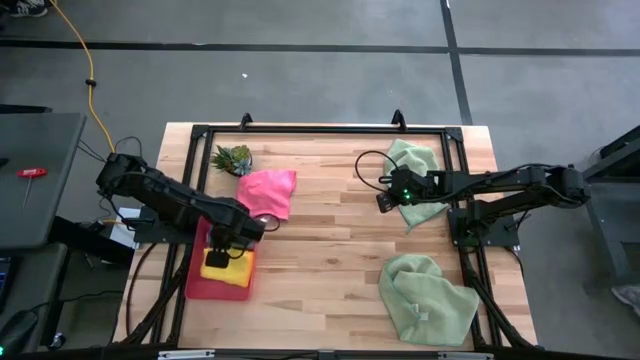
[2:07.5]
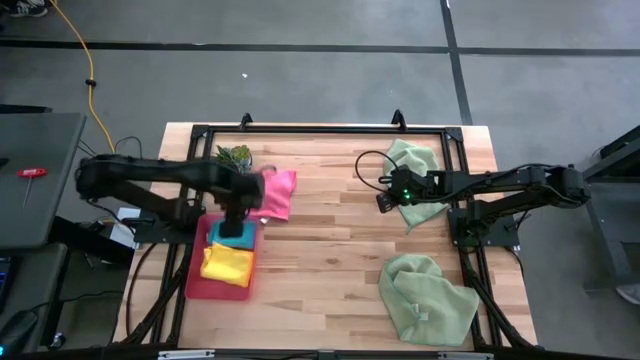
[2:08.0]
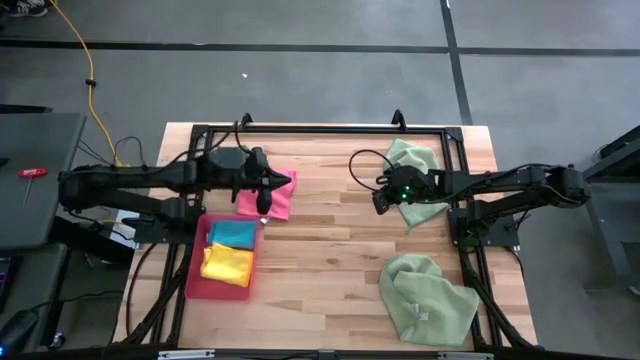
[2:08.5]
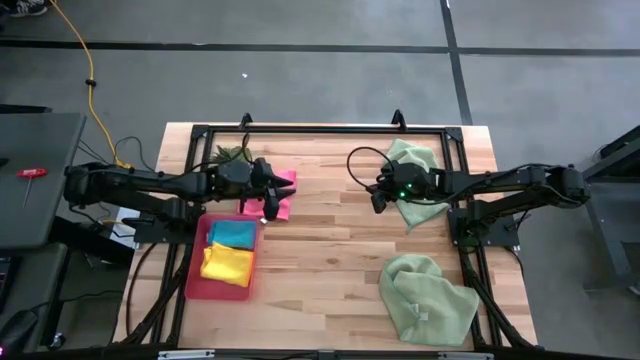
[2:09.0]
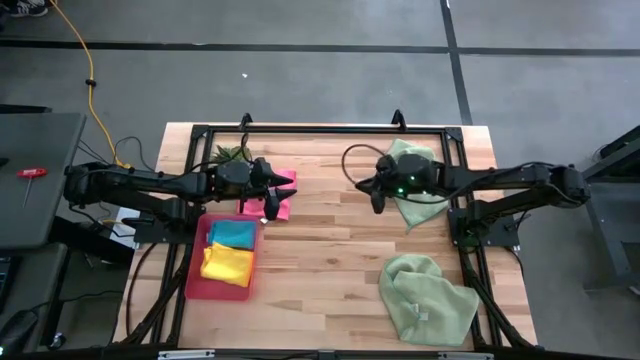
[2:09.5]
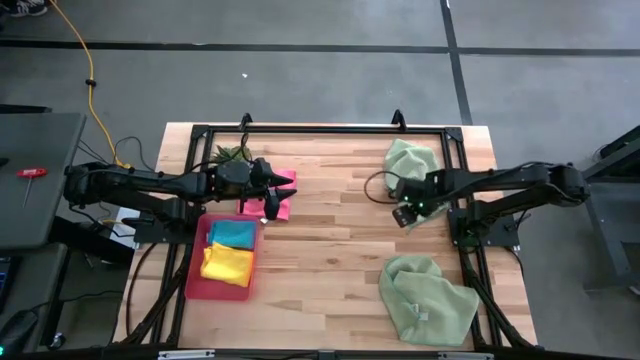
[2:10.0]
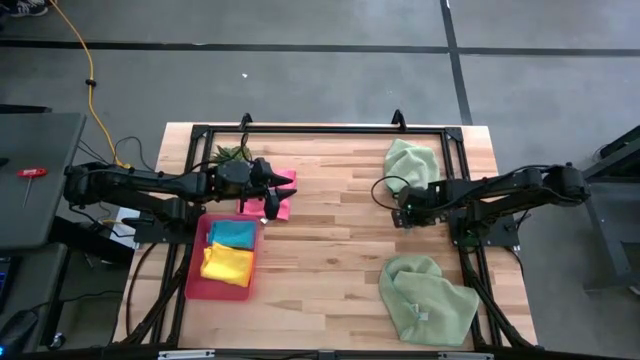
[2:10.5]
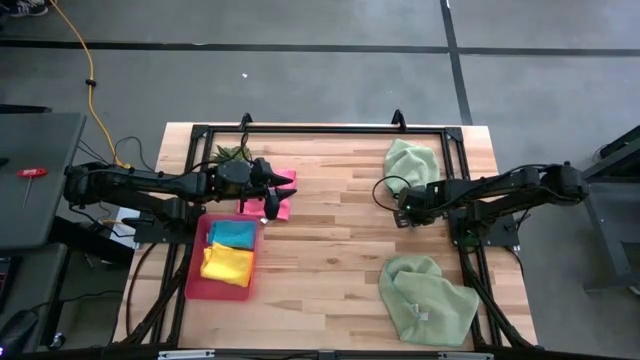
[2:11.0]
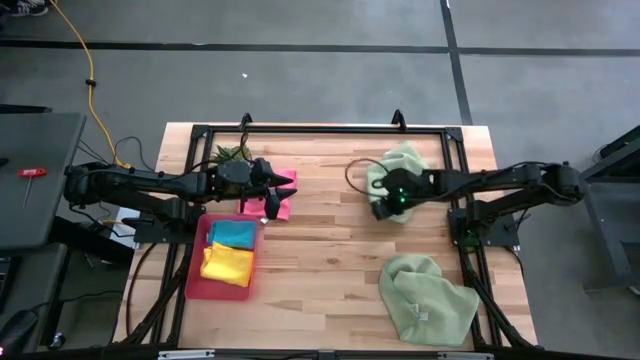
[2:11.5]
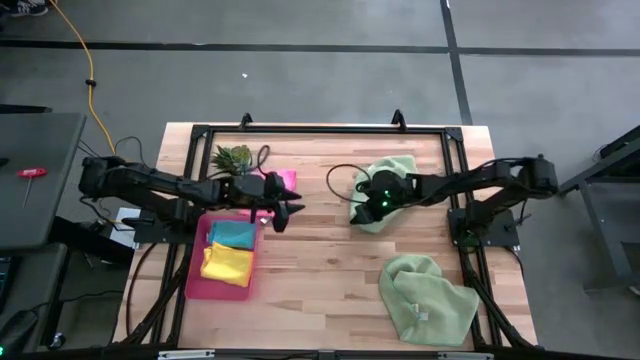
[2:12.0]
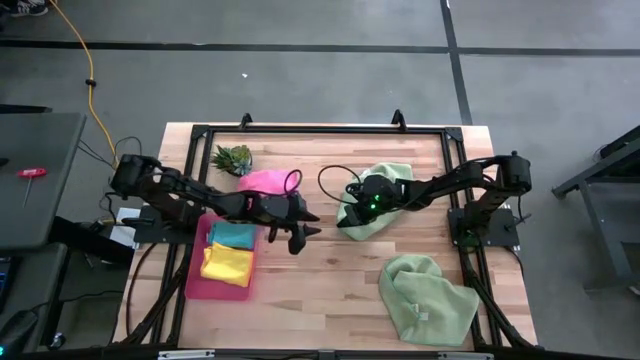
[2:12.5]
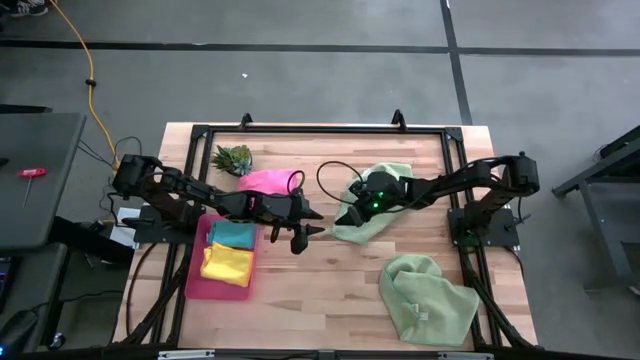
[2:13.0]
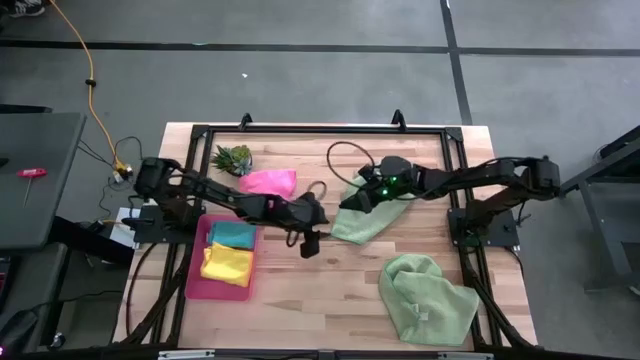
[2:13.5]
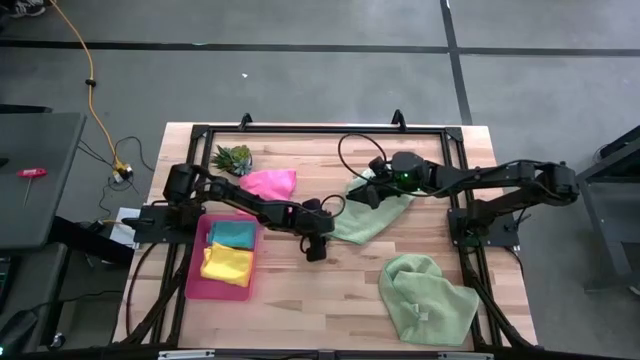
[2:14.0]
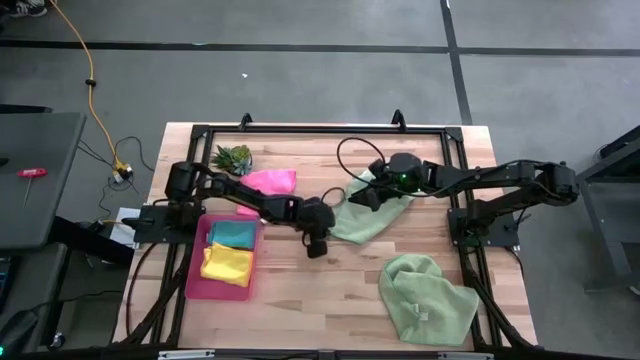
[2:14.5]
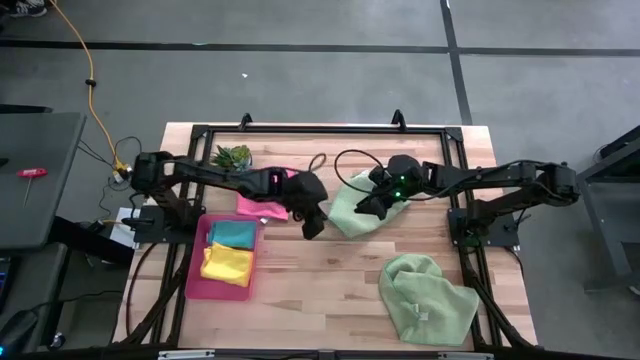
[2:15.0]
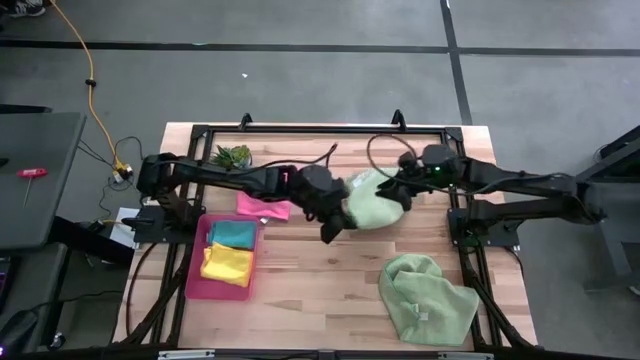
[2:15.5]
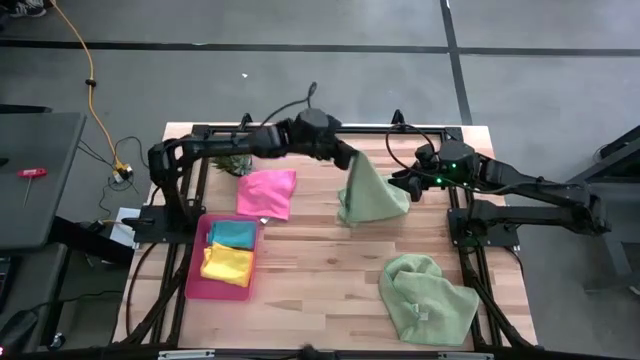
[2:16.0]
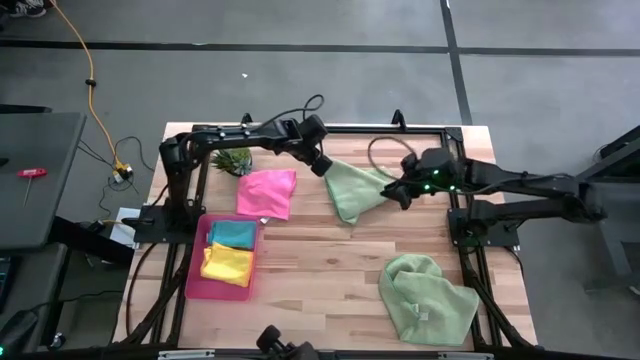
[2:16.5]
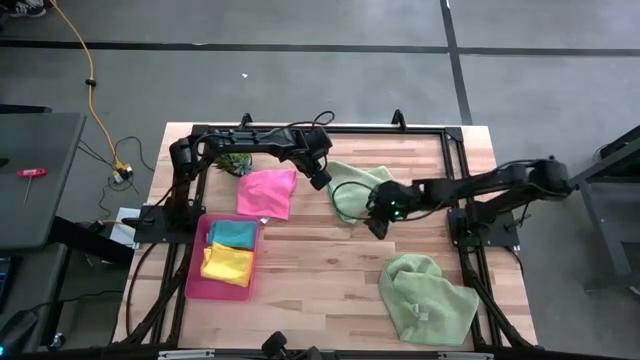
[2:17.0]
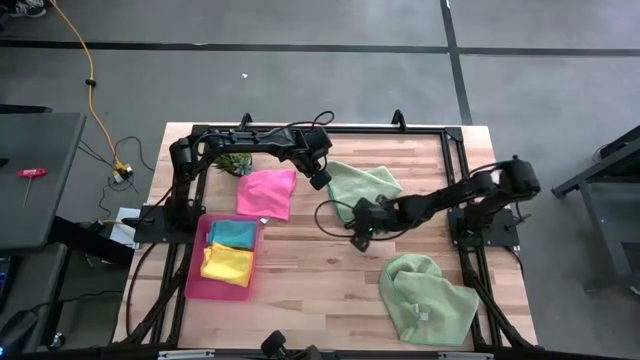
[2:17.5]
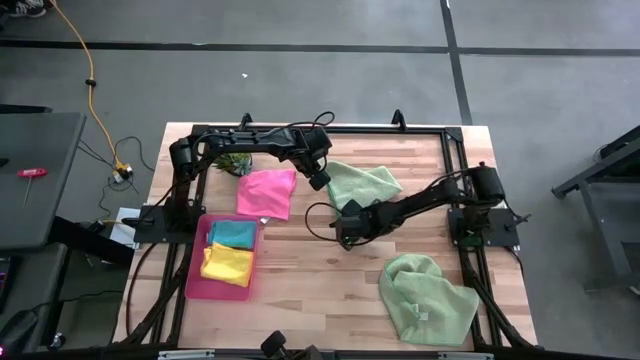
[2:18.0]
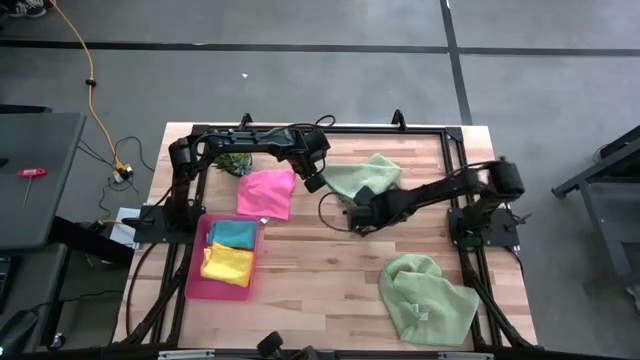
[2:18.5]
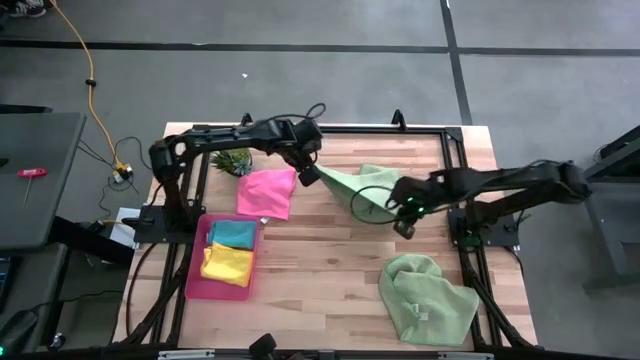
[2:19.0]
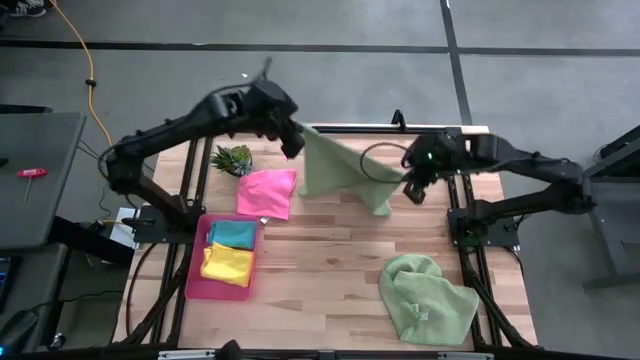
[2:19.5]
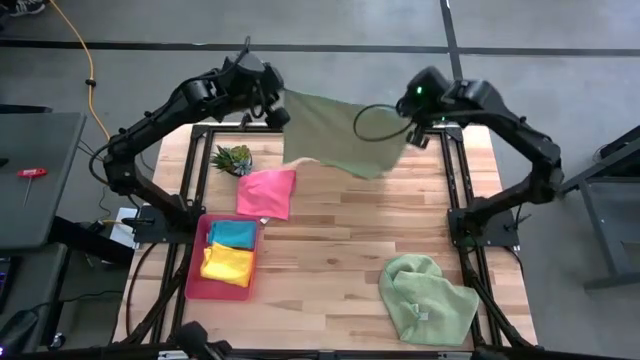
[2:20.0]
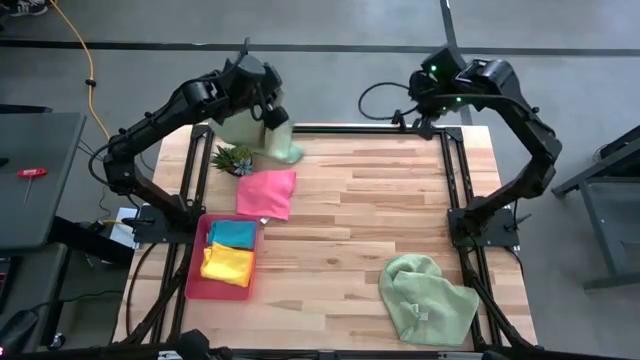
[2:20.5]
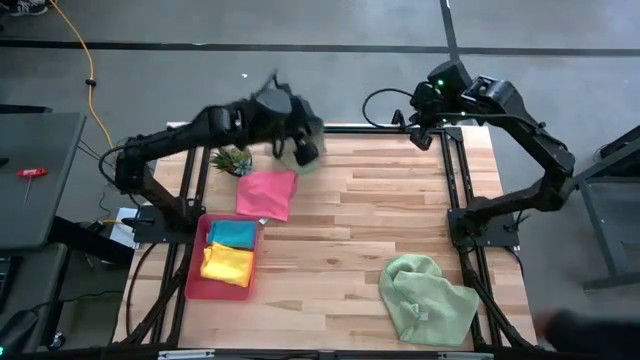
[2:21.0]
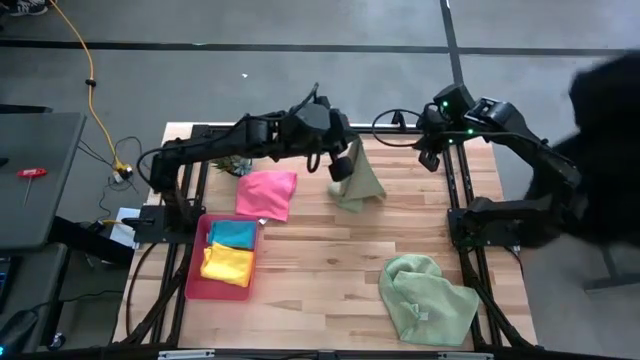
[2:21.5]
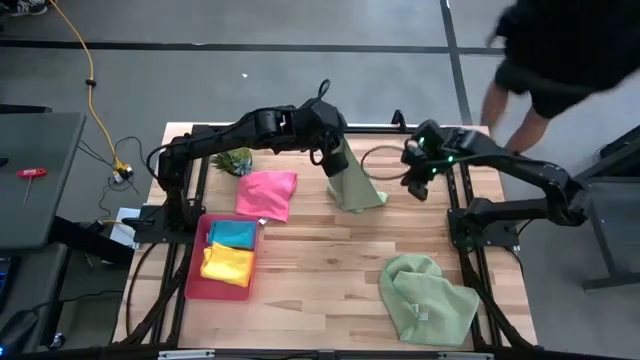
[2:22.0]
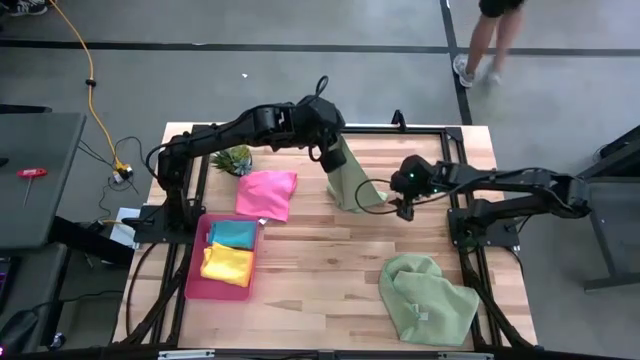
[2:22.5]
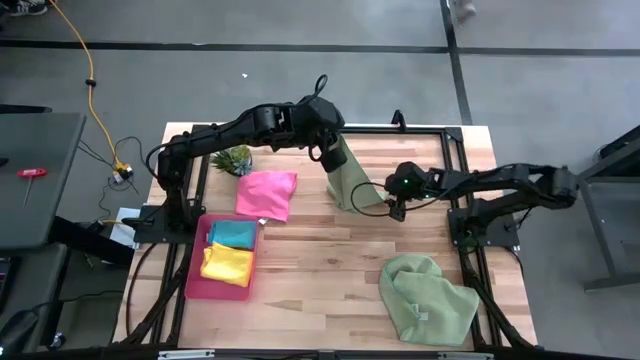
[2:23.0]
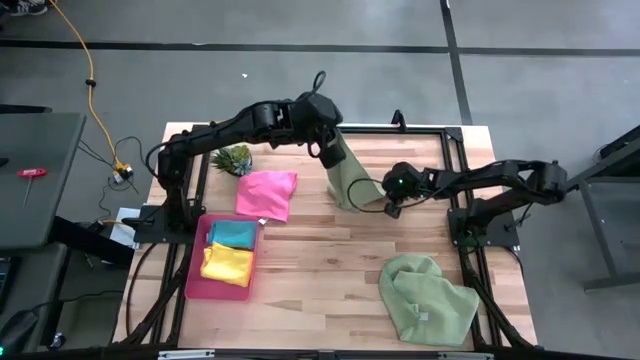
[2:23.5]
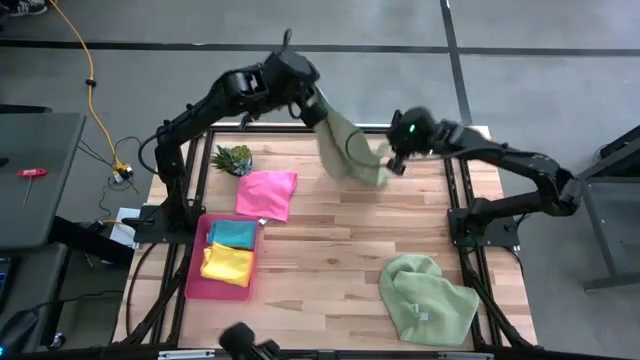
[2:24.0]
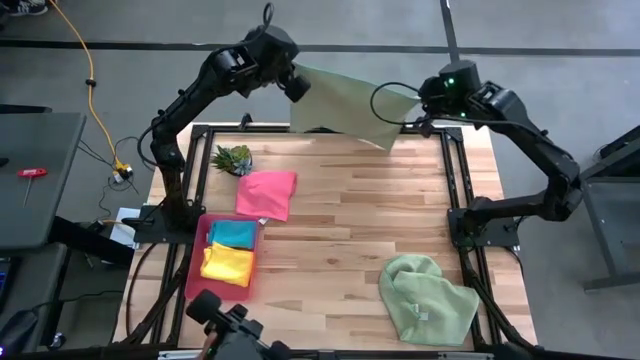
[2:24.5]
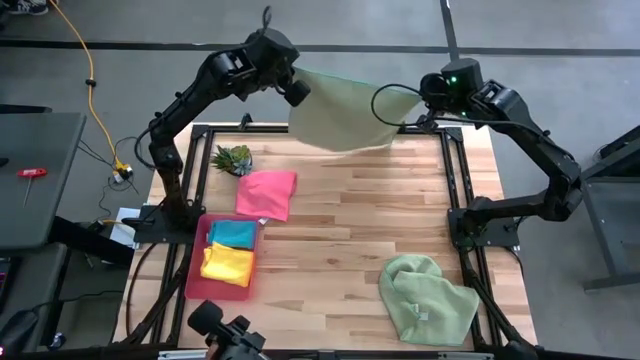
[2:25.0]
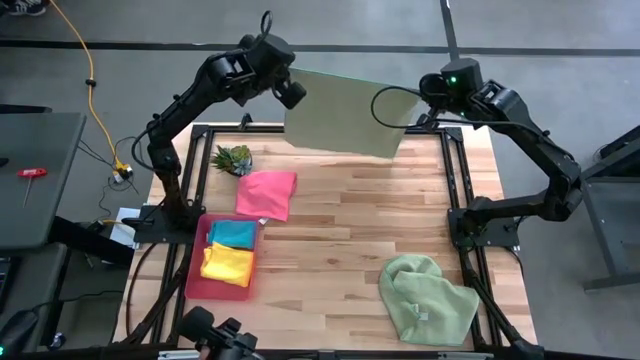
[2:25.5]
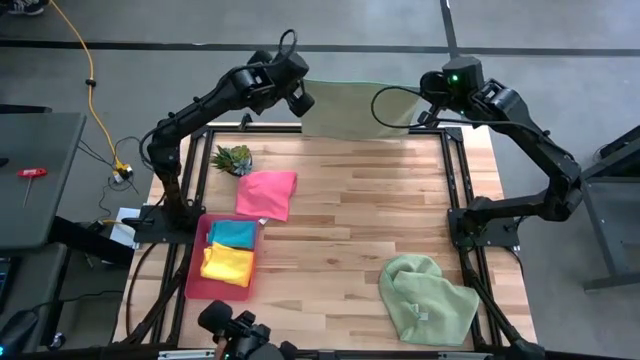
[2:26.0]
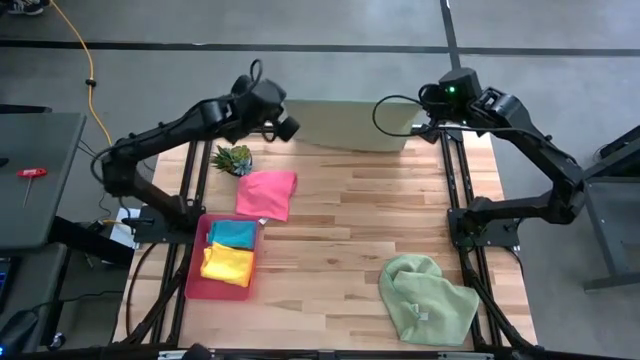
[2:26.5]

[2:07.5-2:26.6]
Task: Fold microfiber towels
Fold the top green microfiber towel
